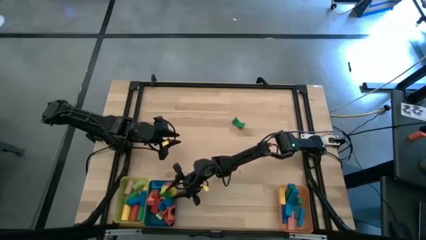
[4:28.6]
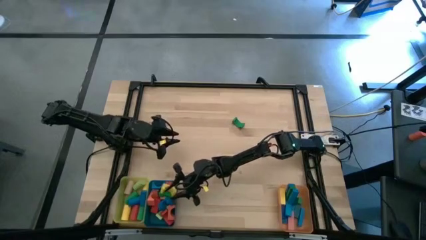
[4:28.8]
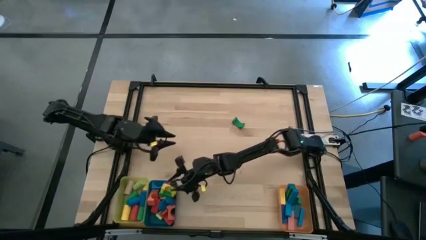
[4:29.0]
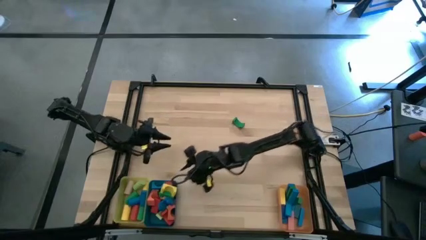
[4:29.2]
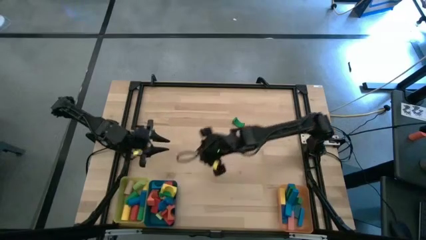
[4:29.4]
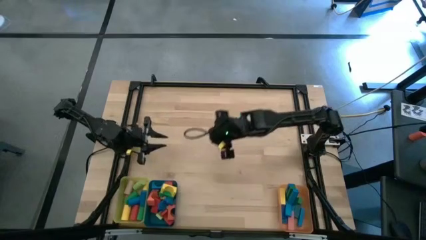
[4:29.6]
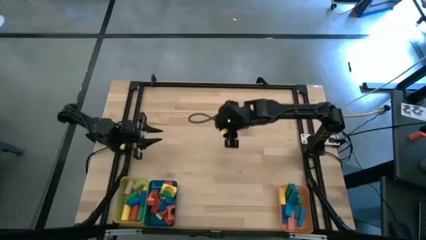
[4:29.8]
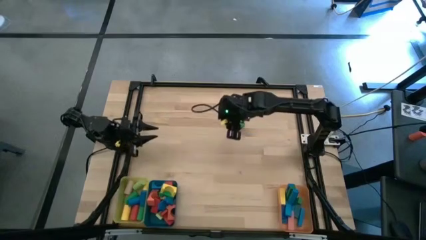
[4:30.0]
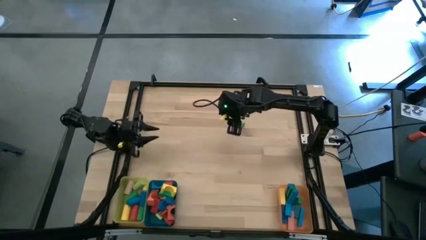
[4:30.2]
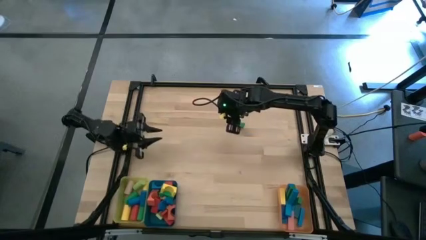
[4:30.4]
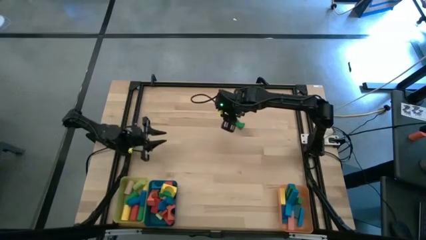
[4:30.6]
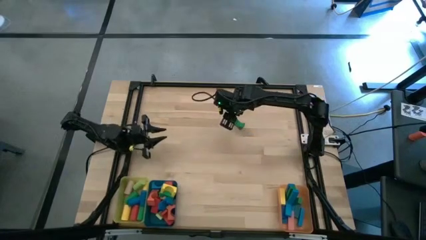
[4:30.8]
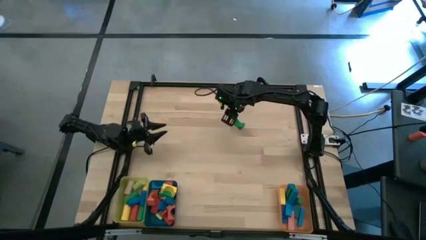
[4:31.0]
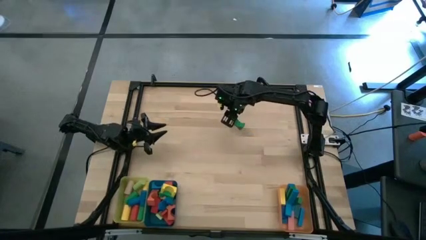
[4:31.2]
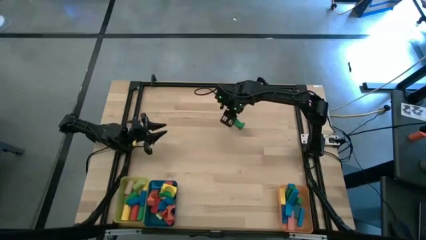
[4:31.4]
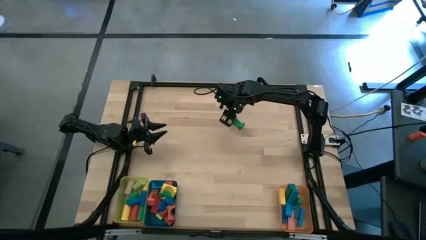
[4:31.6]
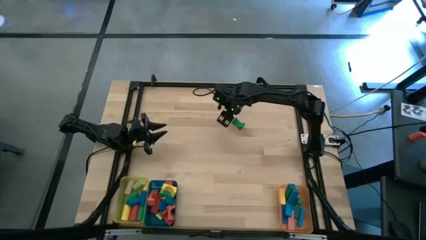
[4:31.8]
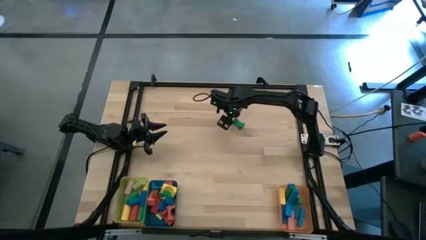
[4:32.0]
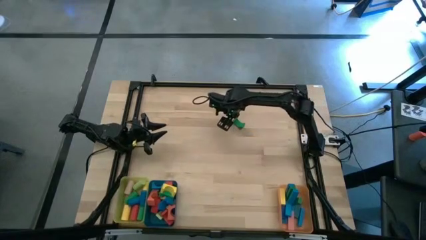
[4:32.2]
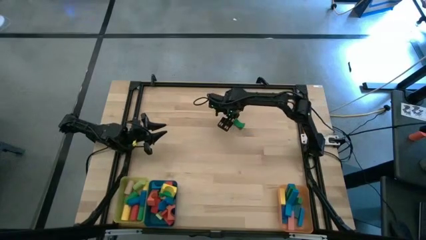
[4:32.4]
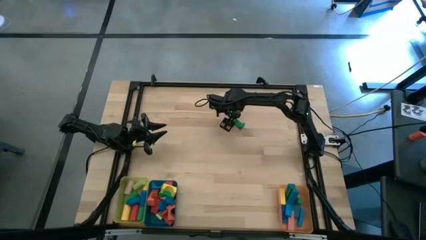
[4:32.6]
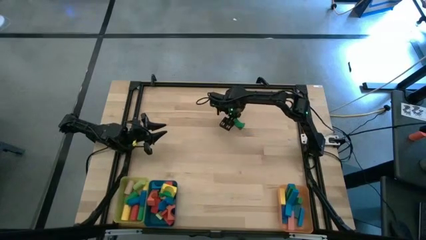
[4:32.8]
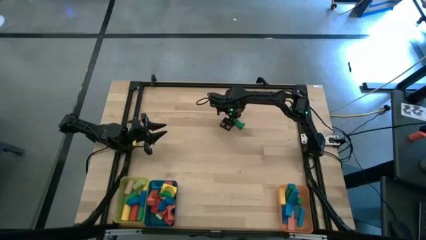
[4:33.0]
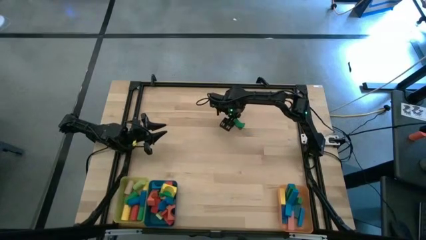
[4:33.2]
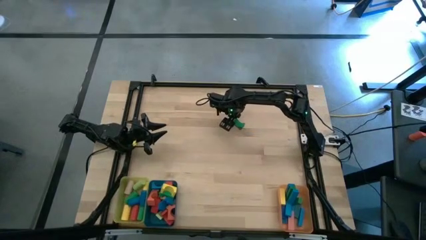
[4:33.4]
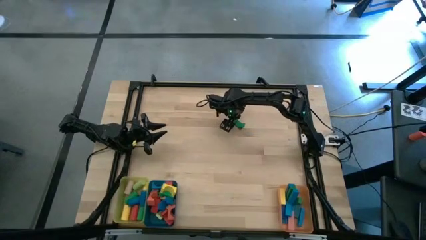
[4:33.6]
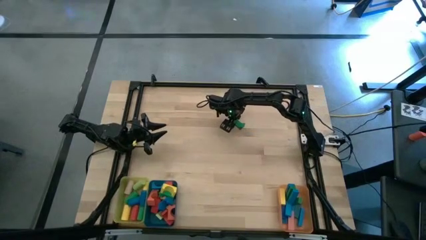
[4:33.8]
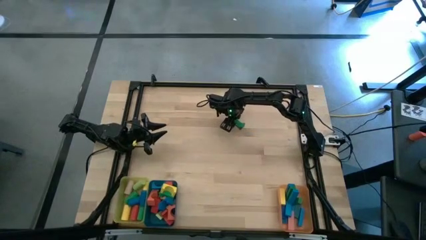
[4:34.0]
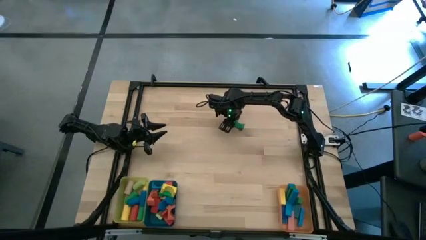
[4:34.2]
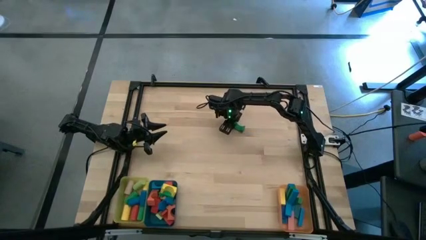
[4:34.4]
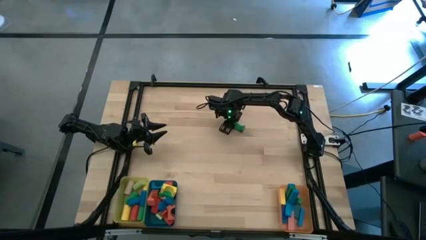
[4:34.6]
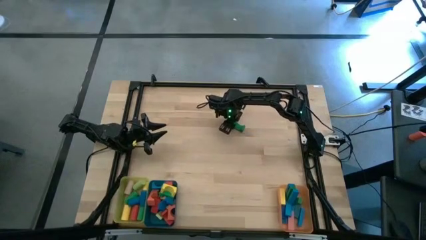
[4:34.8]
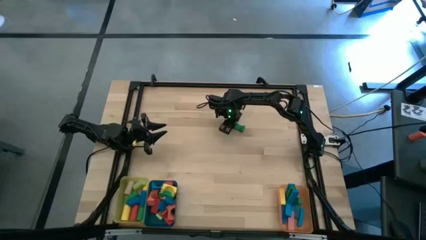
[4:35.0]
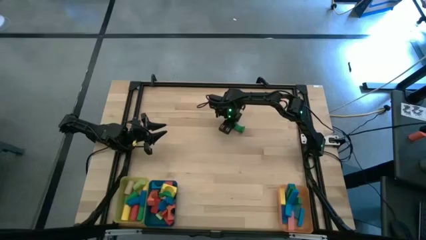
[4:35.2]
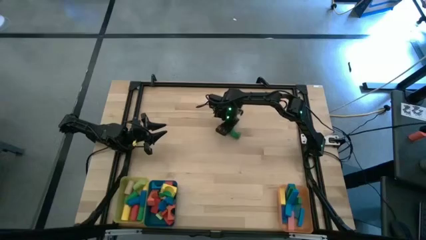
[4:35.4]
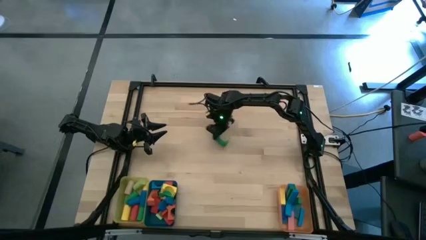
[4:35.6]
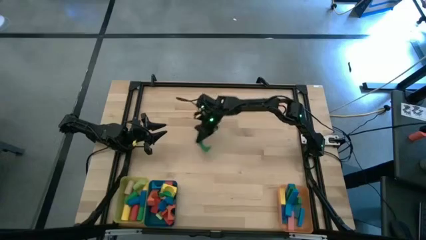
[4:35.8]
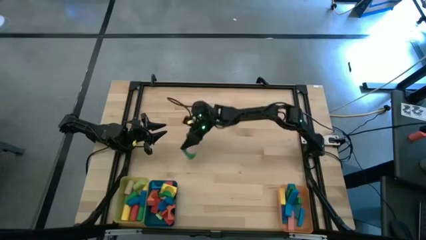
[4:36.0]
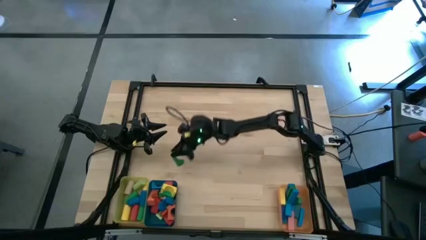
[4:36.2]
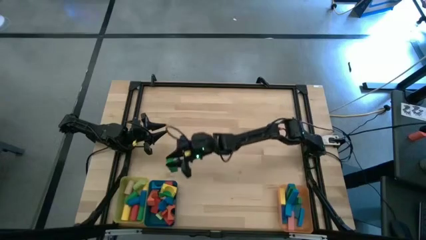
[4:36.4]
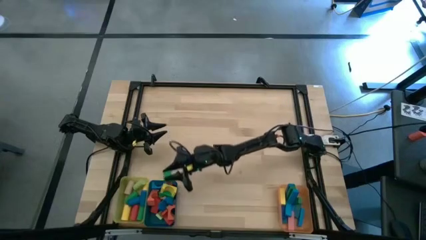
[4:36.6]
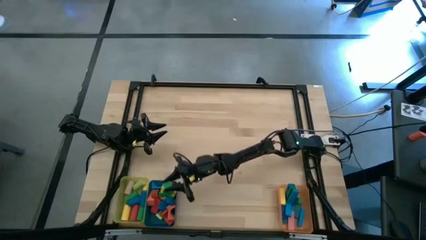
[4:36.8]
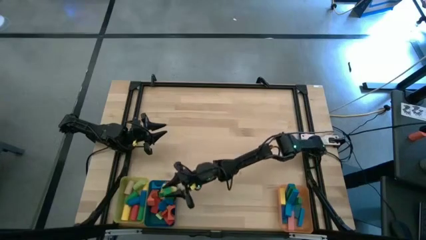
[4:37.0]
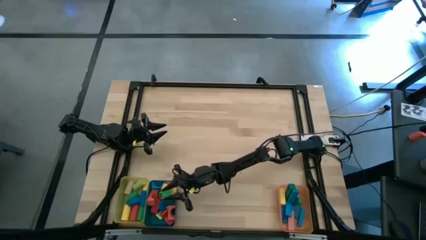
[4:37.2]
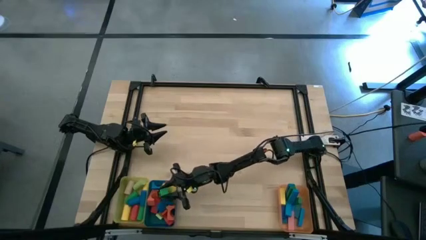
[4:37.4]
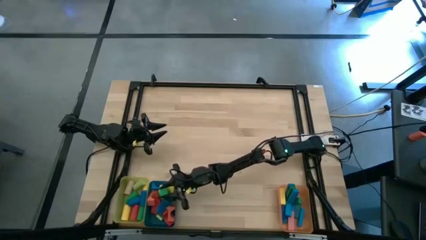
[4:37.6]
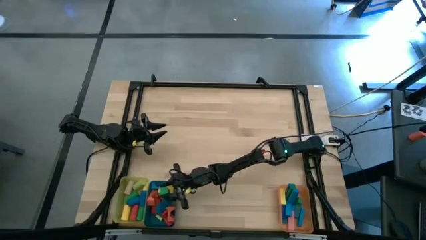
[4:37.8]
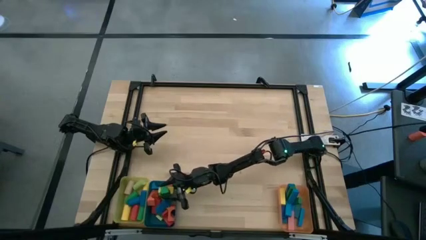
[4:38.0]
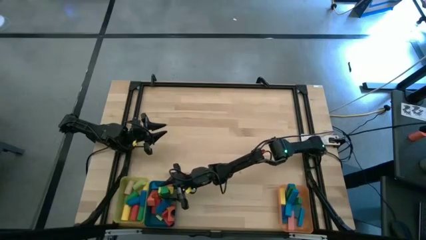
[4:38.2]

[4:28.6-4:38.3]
Task: Sort blocks by size
Put the green arch block into the blue bin

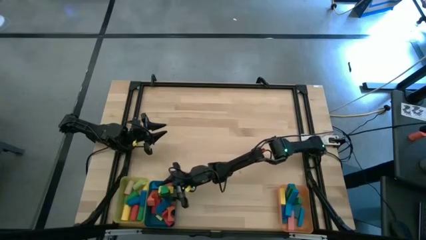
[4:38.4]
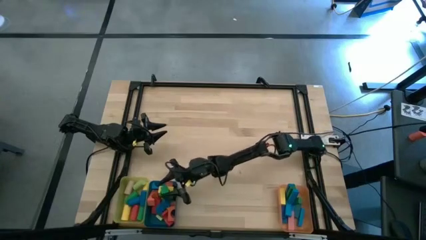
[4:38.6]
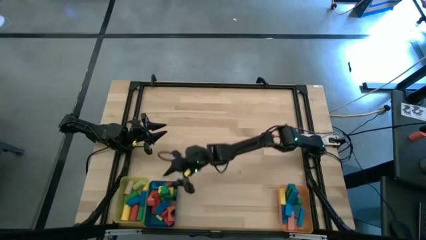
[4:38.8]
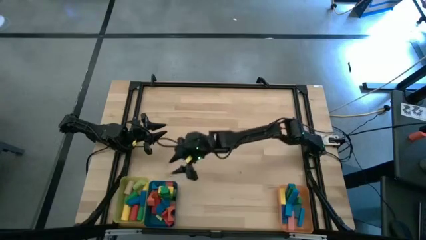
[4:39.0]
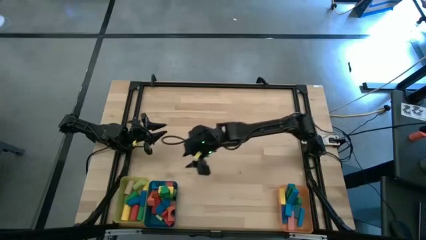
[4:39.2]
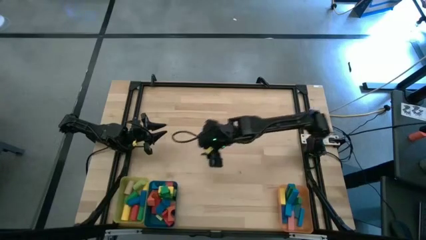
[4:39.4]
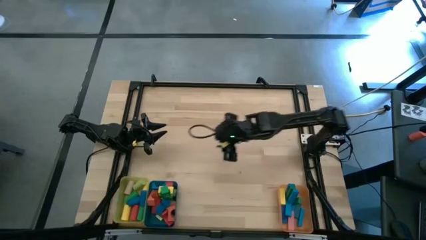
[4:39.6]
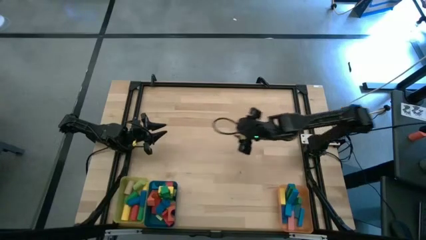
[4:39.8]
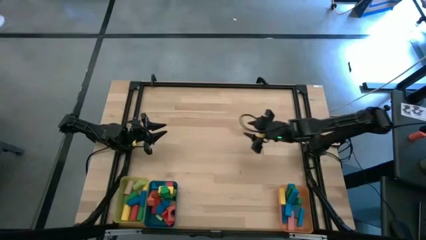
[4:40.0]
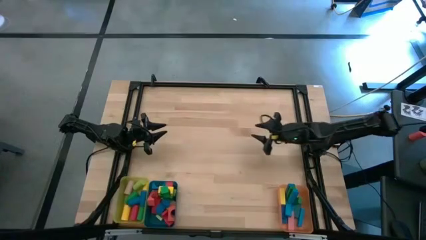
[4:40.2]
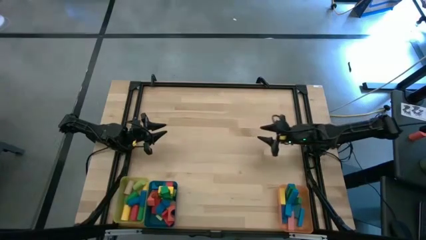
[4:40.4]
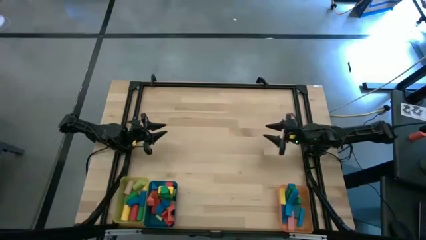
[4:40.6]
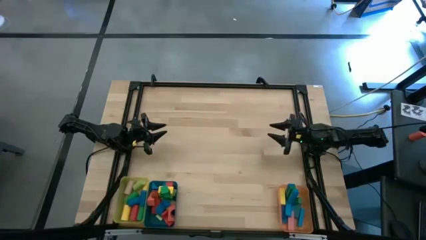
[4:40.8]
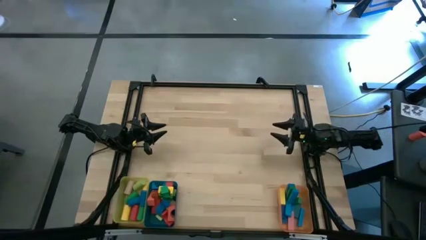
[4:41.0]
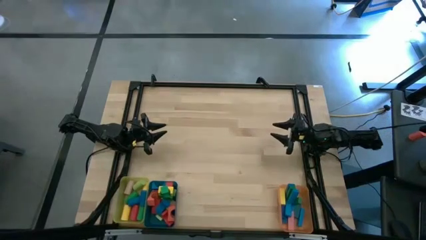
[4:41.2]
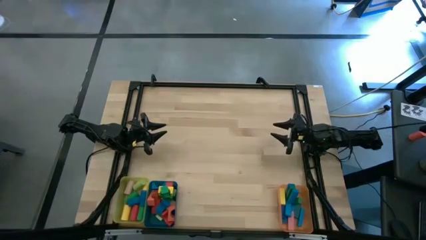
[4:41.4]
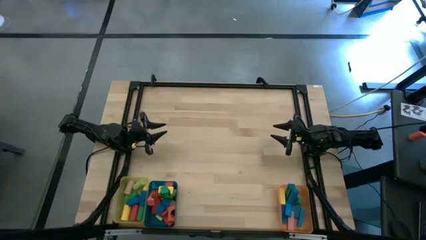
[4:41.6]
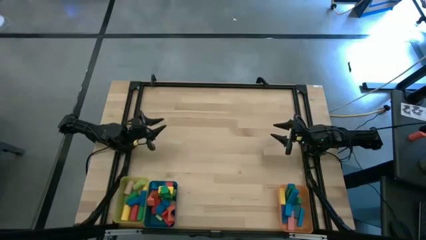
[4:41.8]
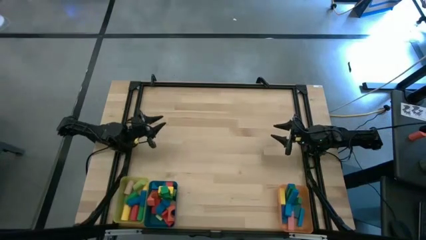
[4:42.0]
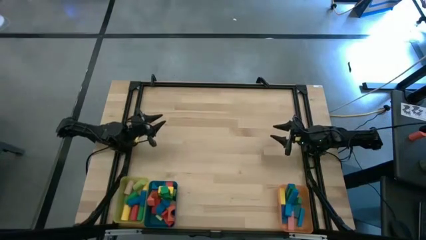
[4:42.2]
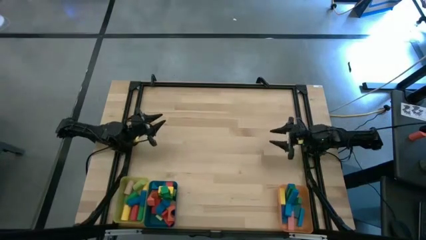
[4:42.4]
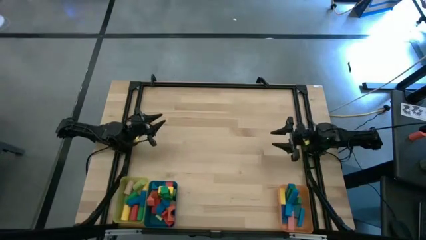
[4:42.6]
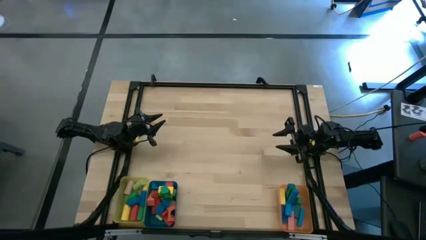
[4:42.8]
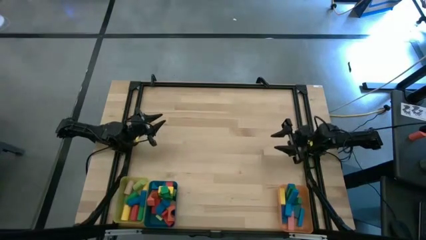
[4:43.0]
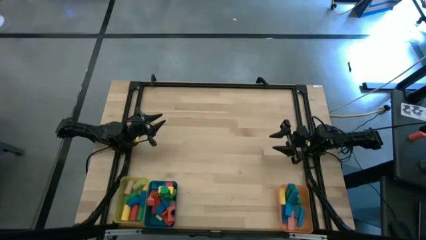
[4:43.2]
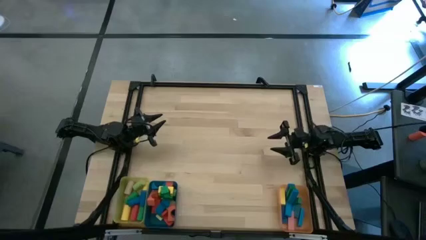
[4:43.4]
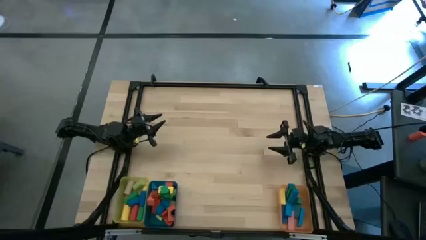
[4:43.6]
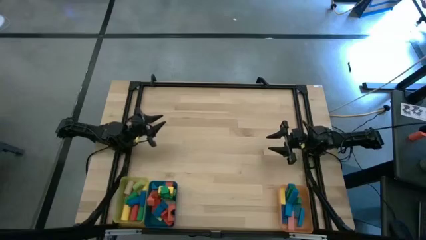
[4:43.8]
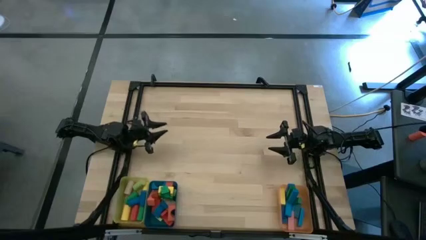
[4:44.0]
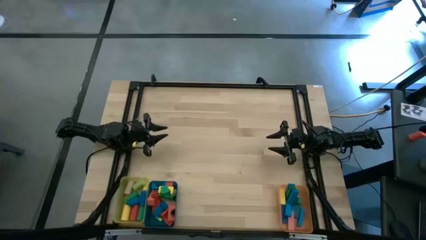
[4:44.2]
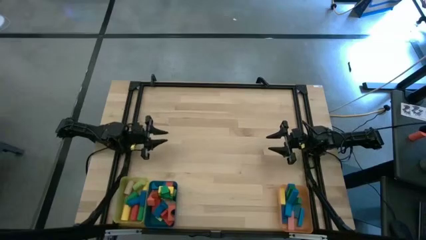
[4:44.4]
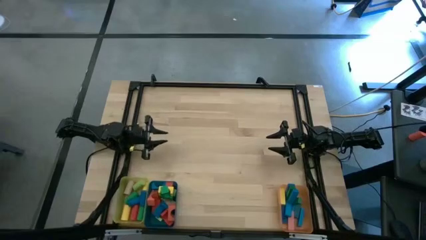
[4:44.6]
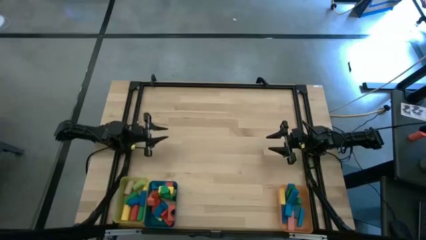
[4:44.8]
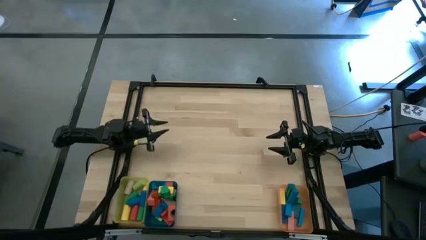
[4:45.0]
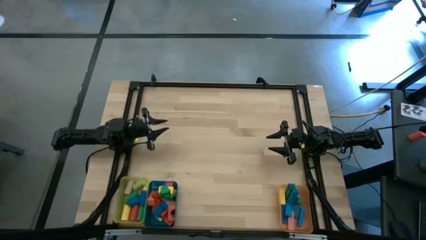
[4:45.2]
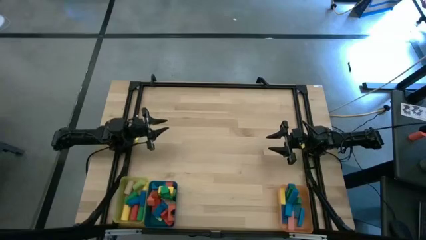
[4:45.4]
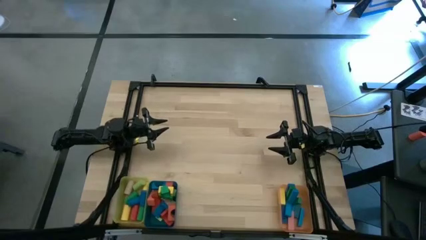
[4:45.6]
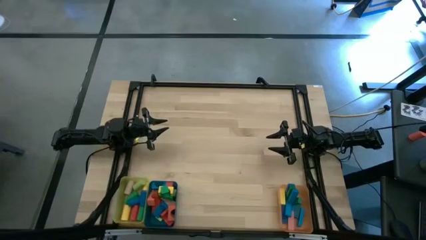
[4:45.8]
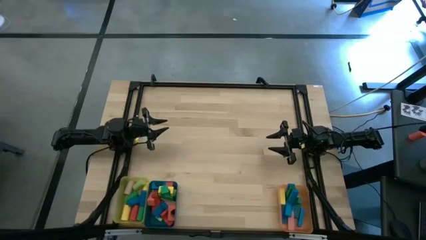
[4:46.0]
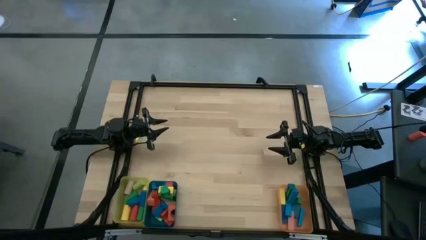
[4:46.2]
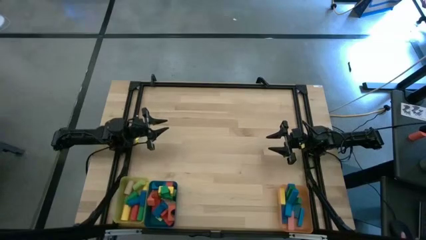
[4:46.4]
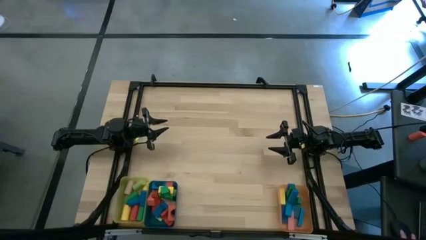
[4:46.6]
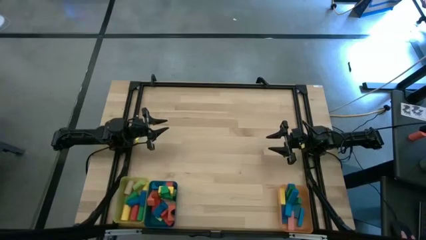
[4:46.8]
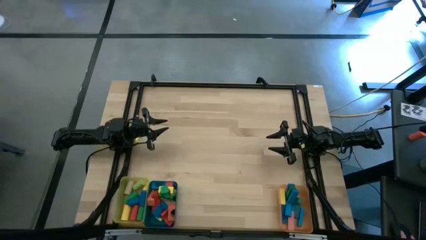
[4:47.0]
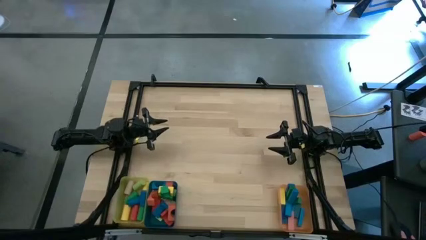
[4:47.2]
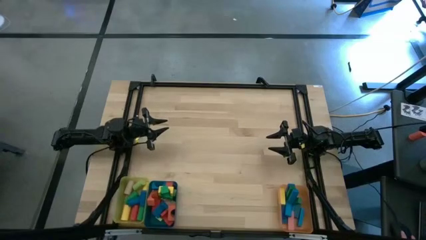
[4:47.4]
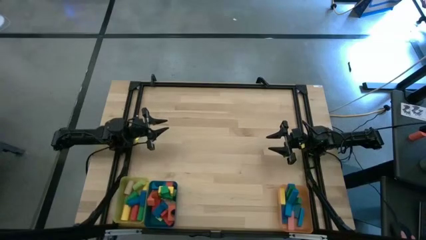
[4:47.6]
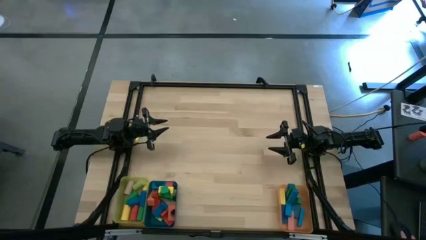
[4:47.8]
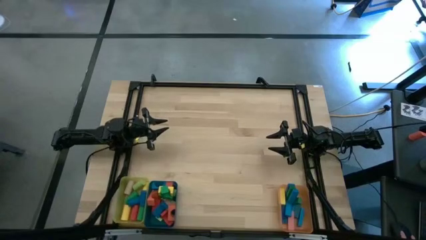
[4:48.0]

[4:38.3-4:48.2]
Return to Home Position
